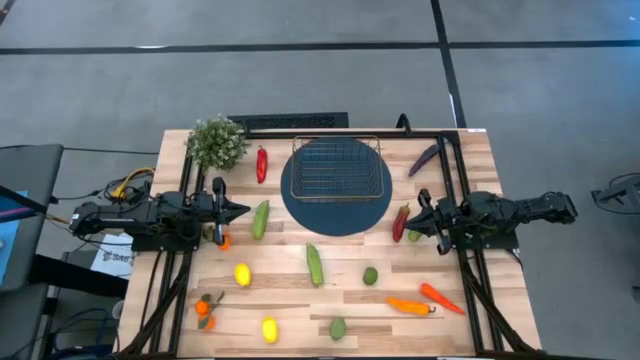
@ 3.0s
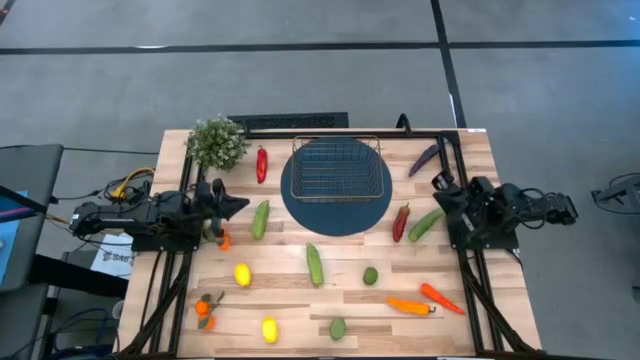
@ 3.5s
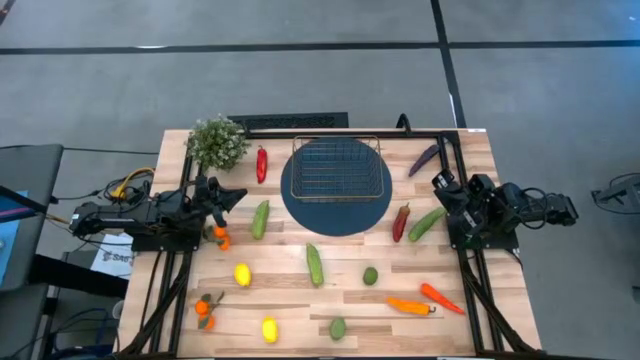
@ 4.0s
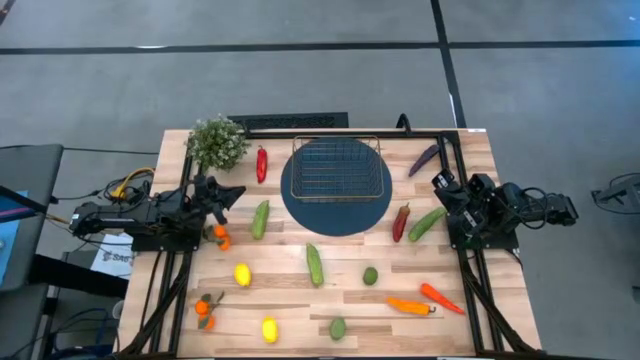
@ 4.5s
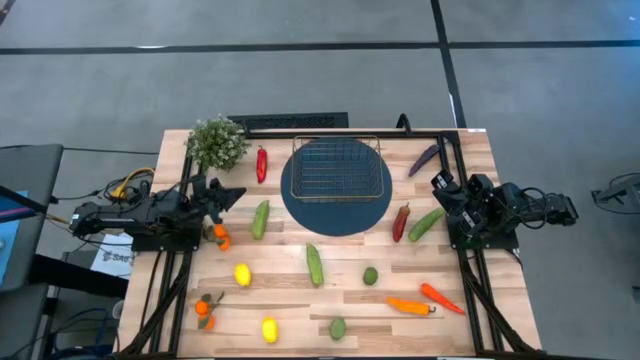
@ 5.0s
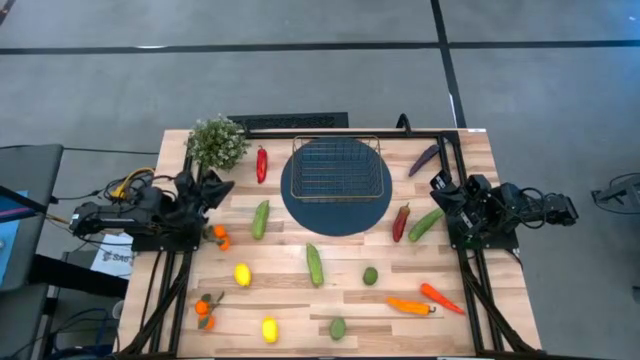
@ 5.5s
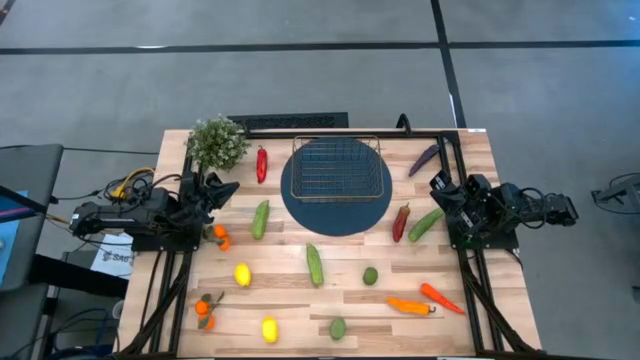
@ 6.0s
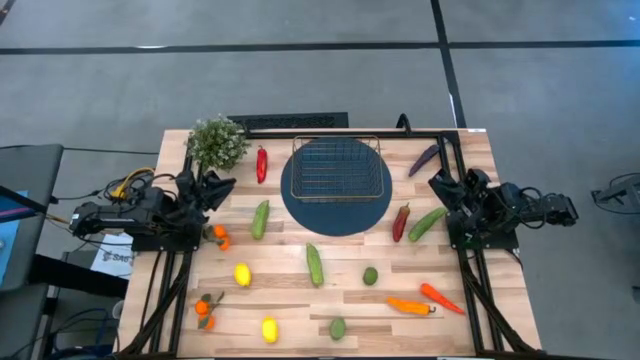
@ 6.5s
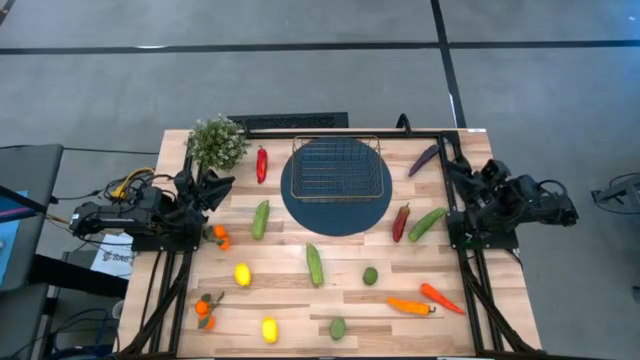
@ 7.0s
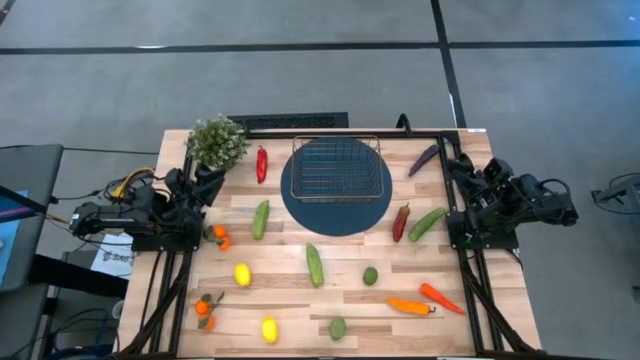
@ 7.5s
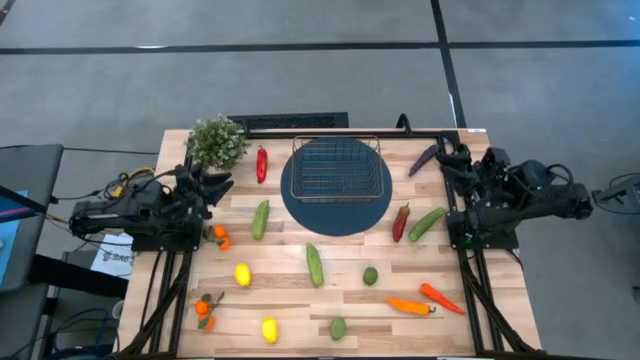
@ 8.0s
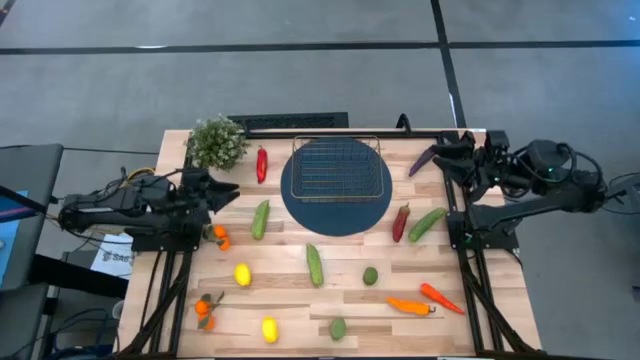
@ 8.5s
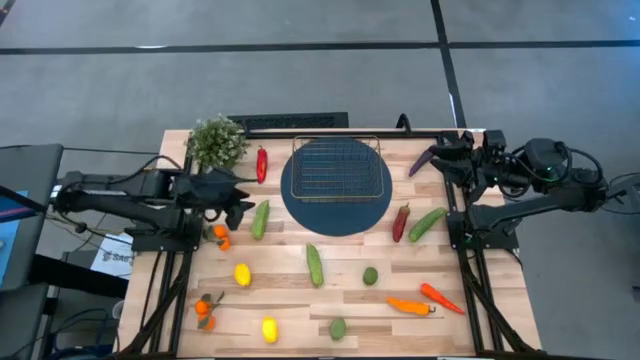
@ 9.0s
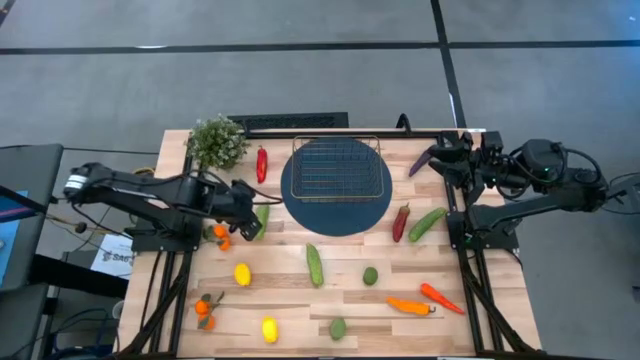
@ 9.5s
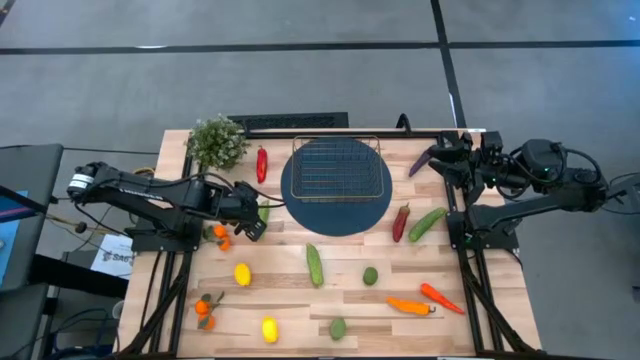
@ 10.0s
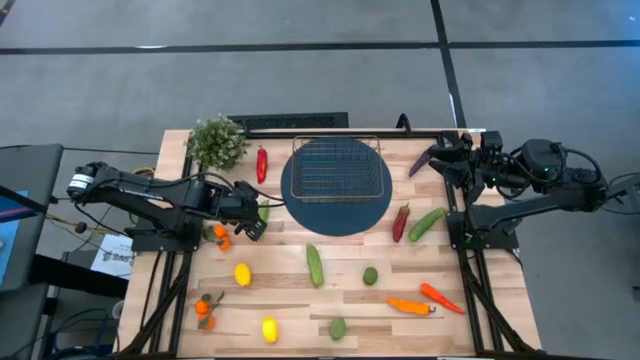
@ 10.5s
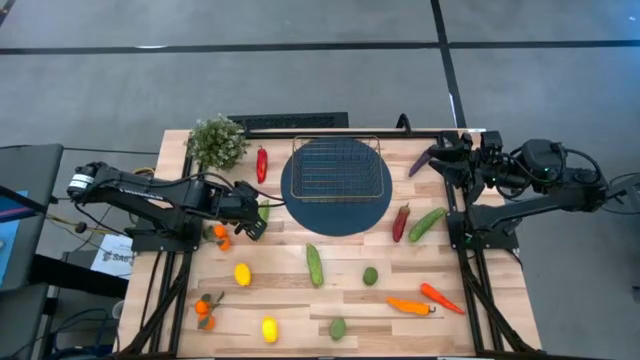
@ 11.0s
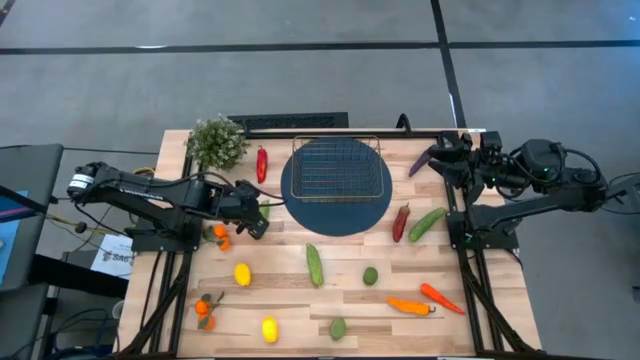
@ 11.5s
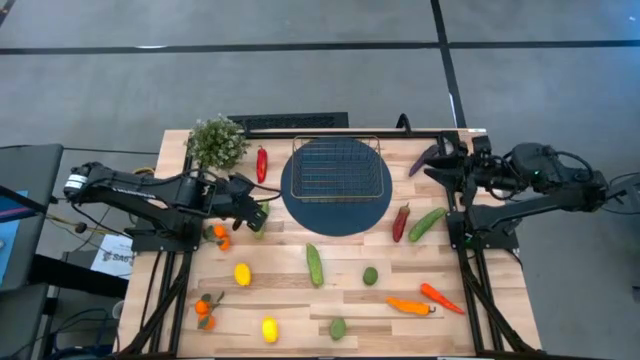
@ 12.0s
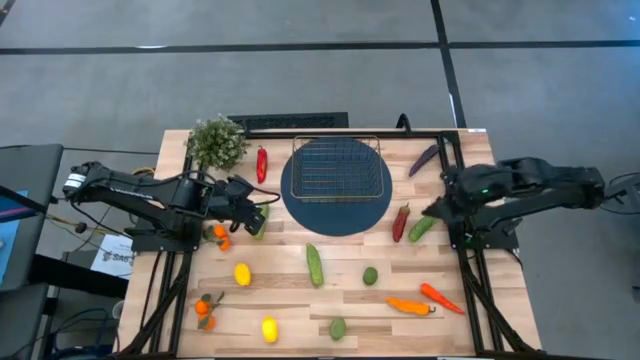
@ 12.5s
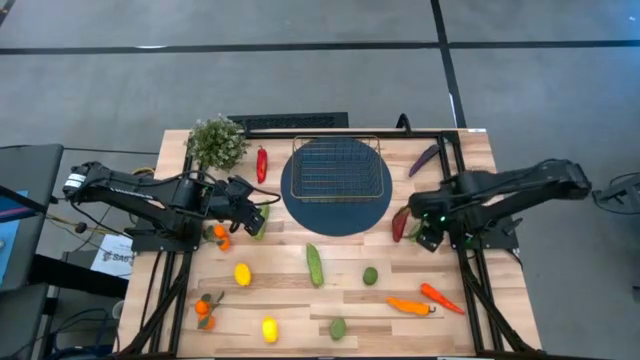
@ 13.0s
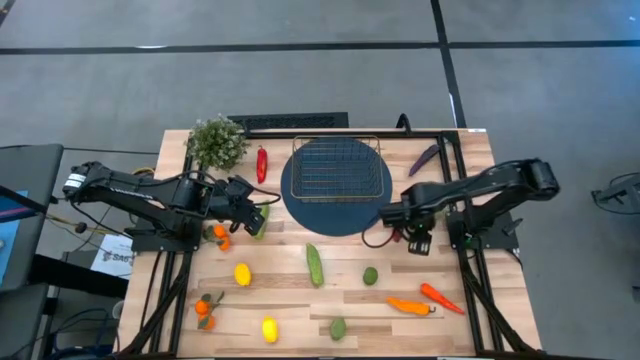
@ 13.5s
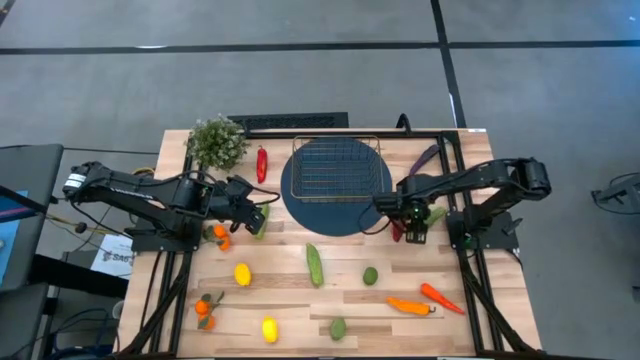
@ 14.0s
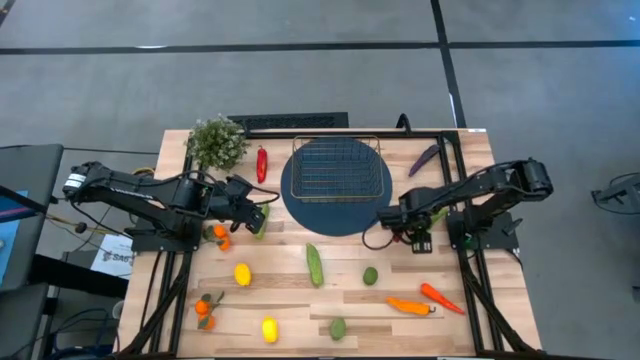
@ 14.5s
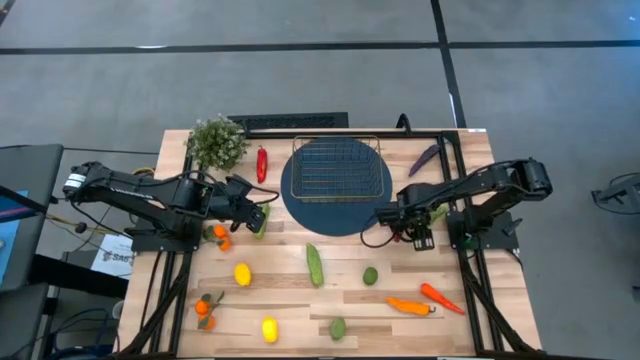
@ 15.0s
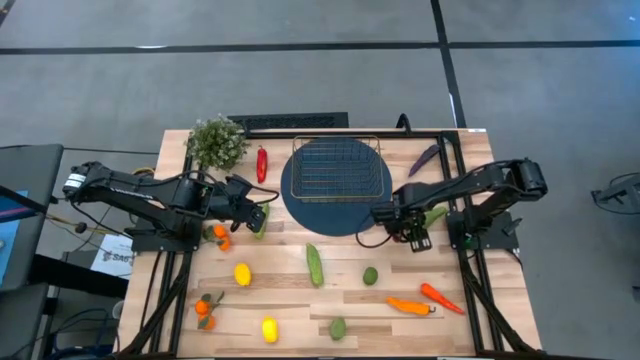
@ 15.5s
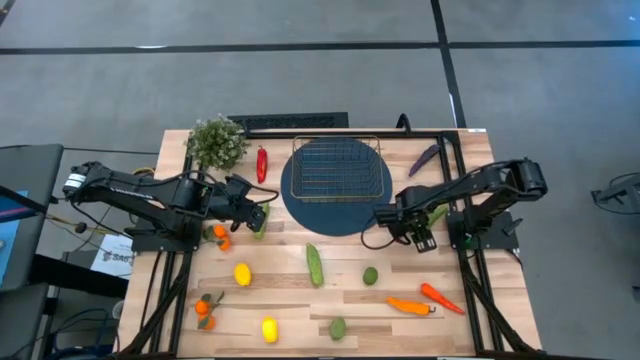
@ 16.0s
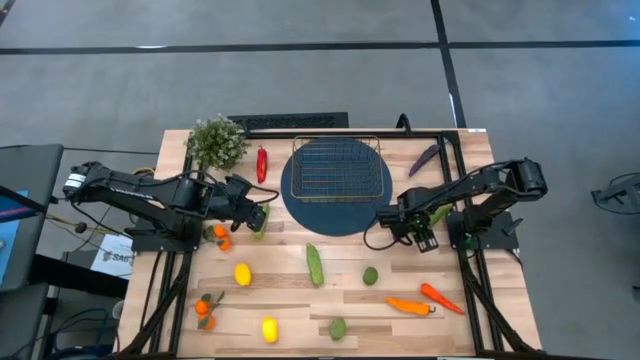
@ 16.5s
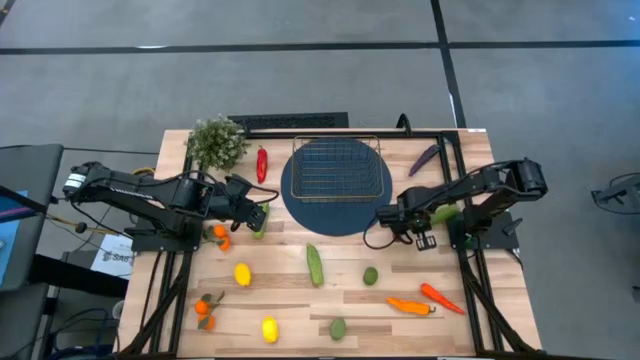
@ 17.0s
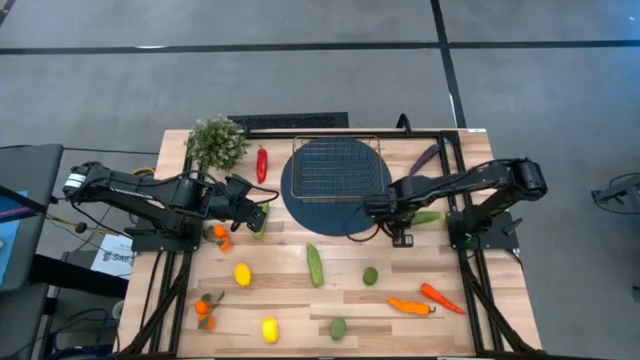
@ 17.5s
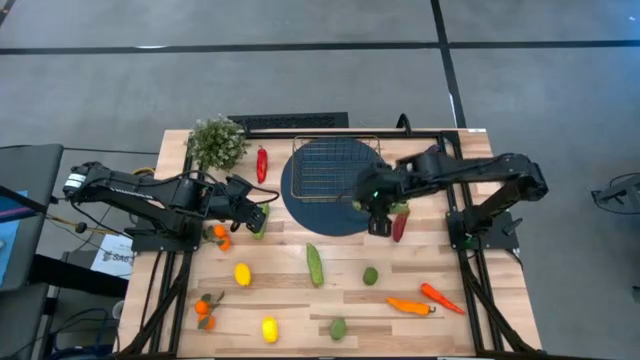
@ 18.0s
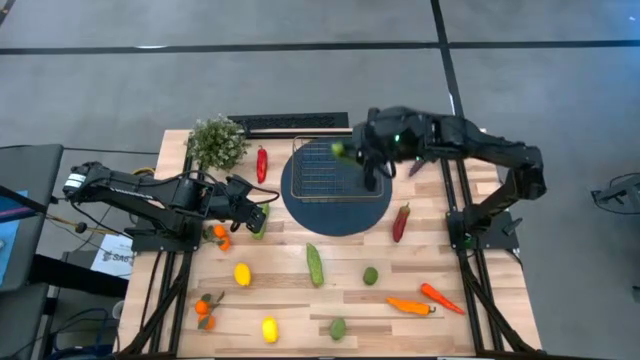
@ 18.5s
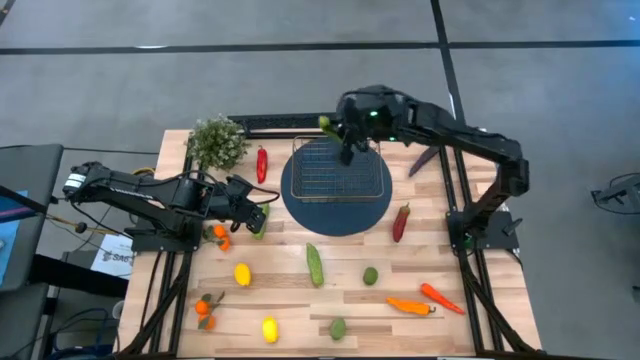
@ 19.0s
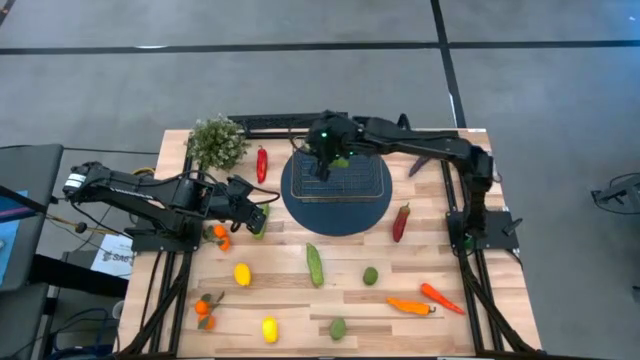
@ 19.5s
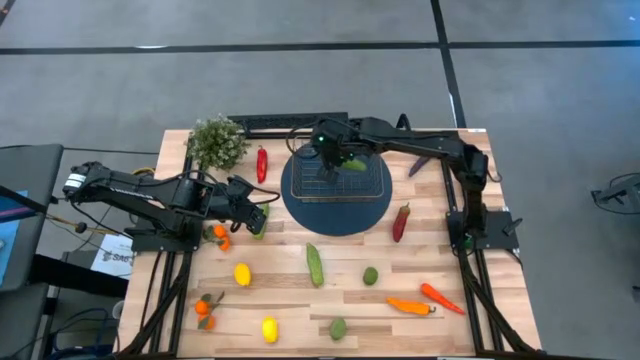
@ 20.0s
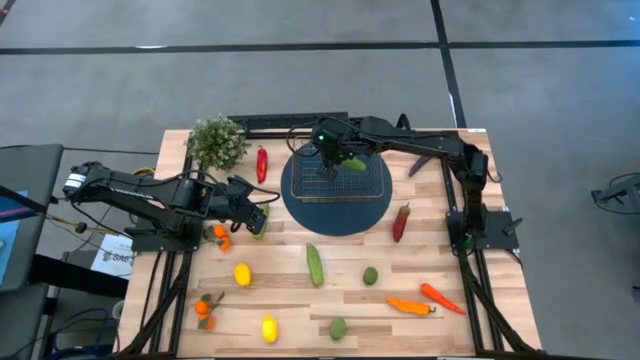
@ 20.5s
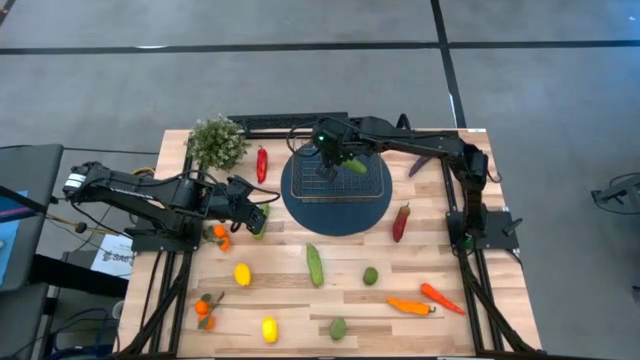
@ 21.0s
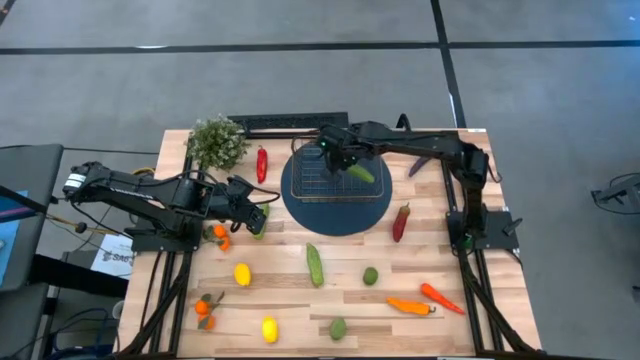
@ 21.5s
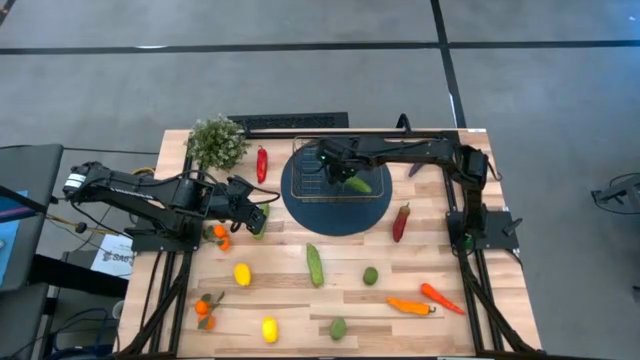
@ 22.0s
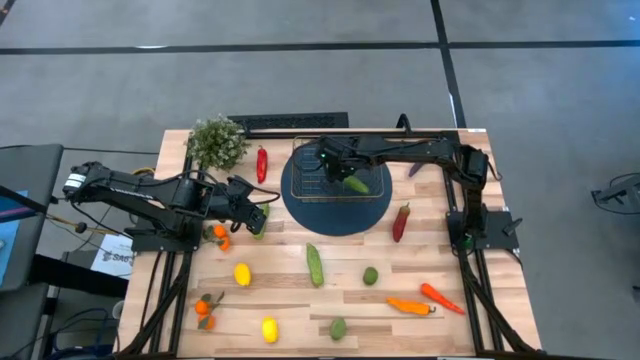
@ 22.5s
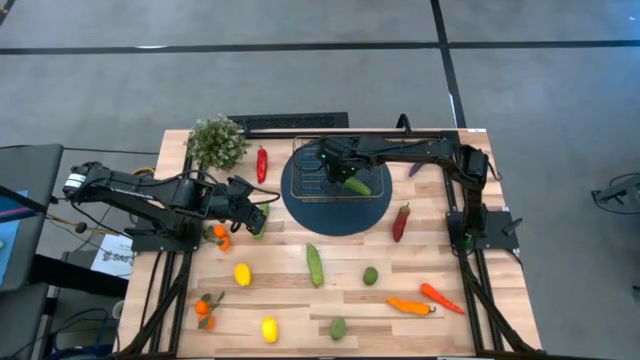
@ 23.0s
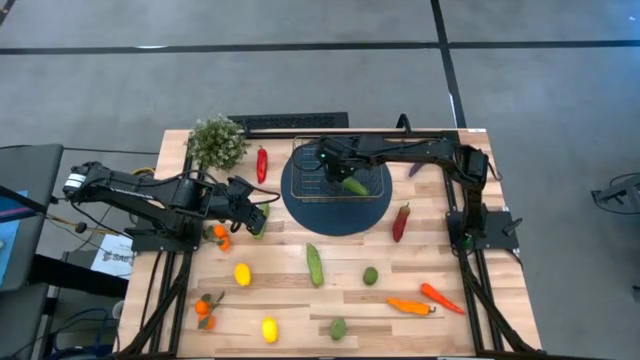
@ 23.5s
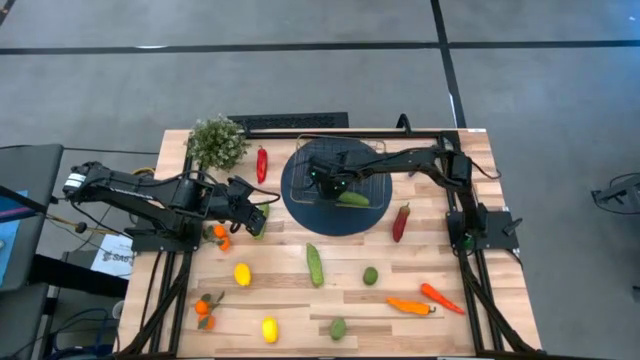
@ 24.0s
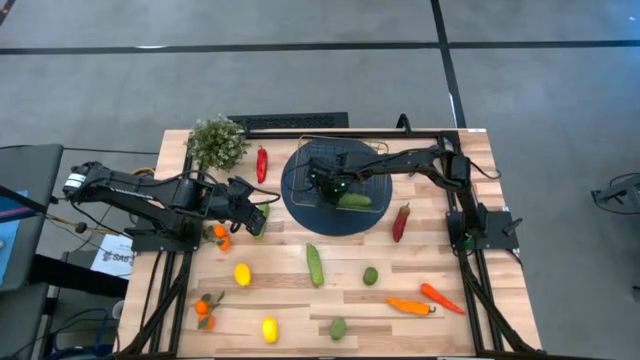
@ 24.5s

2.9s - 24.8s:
Task: Build produce basket
Put the right cucumber into the wire basket
